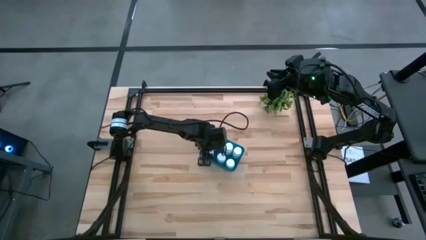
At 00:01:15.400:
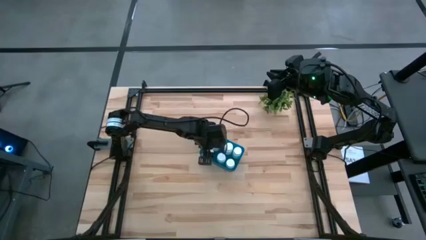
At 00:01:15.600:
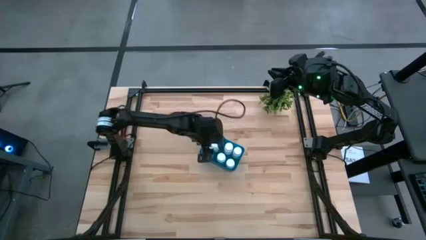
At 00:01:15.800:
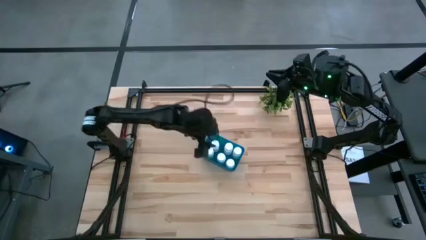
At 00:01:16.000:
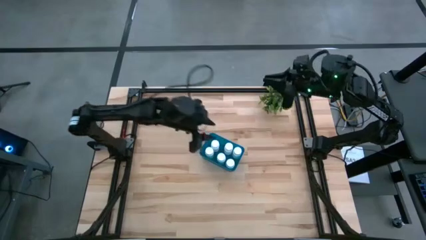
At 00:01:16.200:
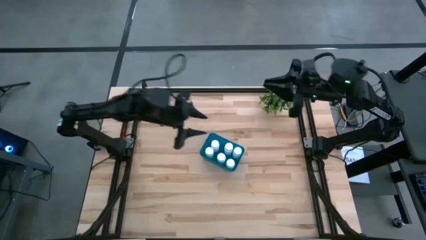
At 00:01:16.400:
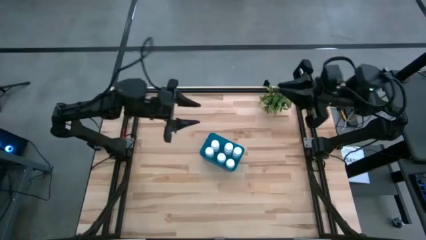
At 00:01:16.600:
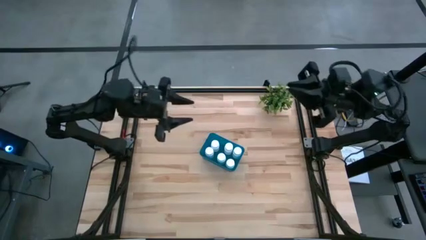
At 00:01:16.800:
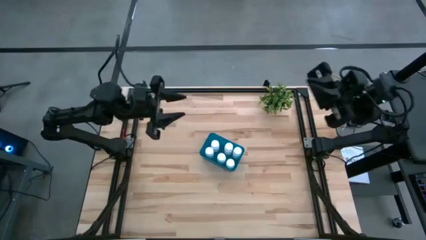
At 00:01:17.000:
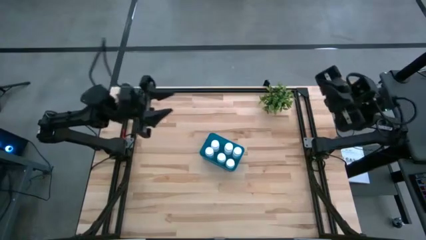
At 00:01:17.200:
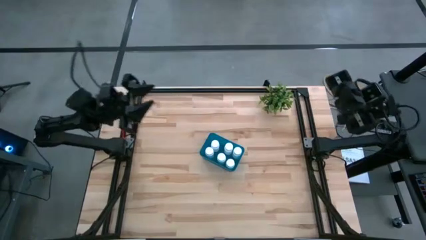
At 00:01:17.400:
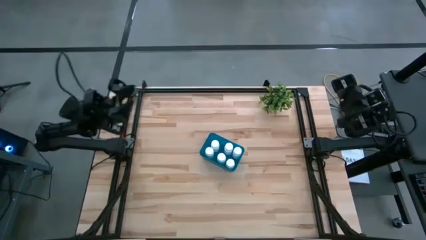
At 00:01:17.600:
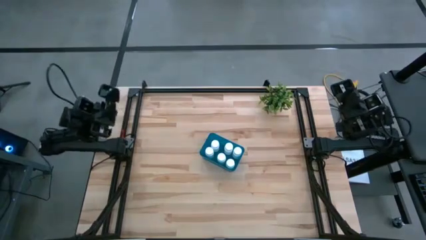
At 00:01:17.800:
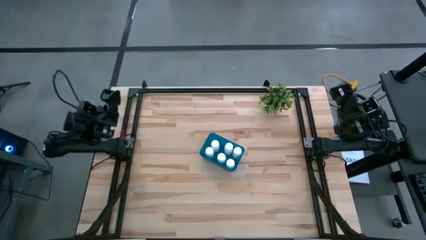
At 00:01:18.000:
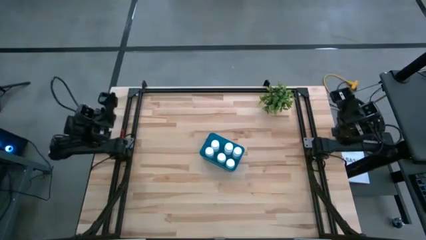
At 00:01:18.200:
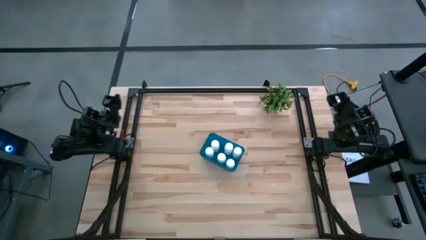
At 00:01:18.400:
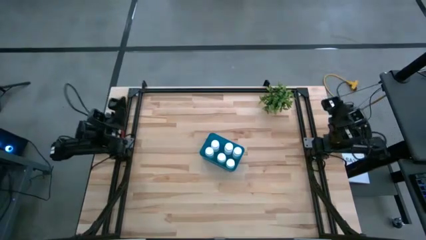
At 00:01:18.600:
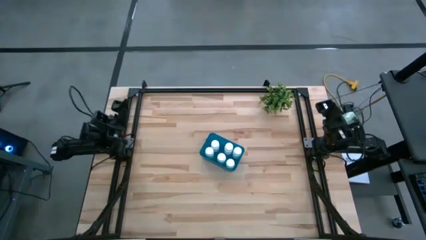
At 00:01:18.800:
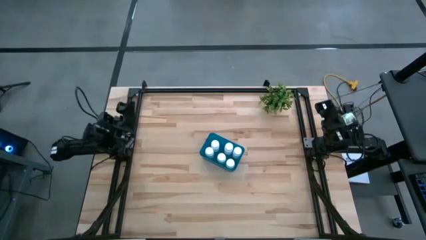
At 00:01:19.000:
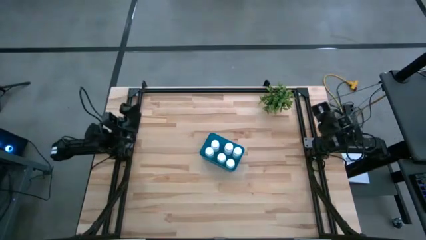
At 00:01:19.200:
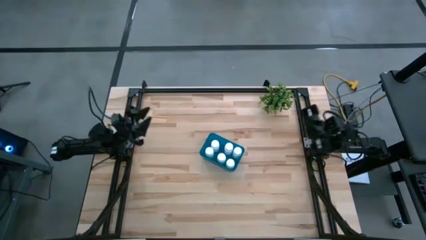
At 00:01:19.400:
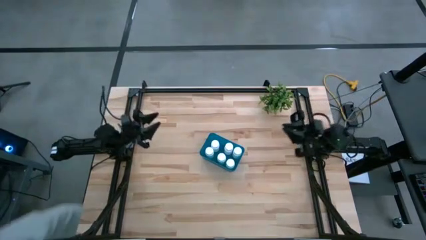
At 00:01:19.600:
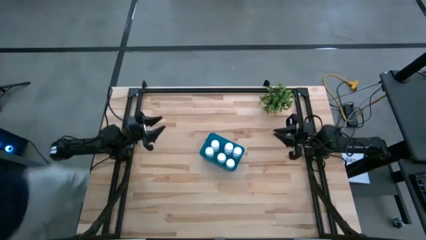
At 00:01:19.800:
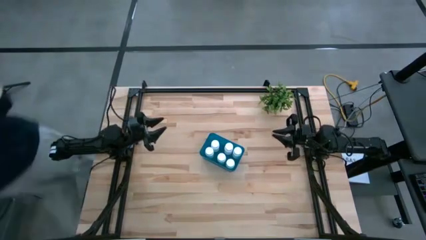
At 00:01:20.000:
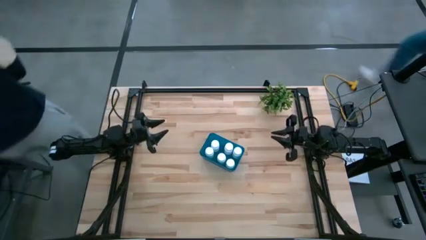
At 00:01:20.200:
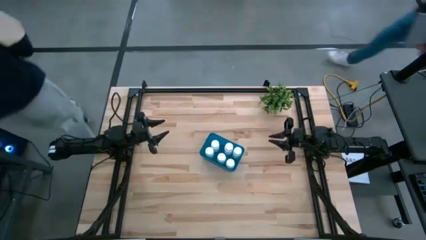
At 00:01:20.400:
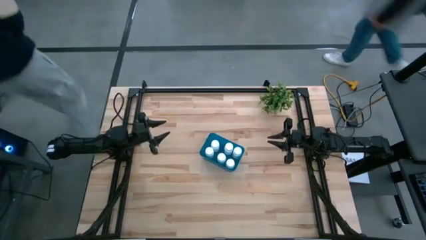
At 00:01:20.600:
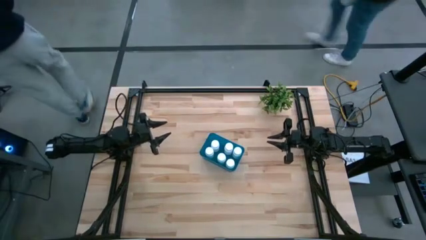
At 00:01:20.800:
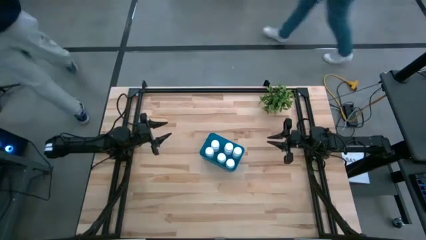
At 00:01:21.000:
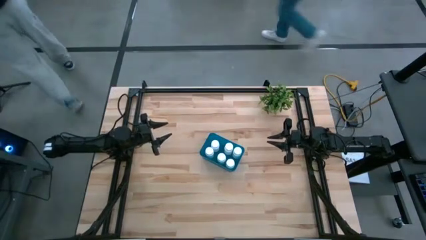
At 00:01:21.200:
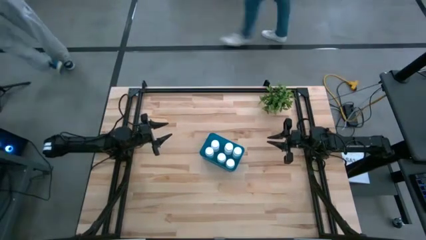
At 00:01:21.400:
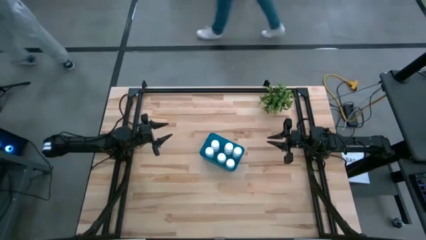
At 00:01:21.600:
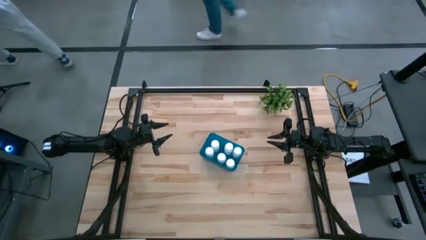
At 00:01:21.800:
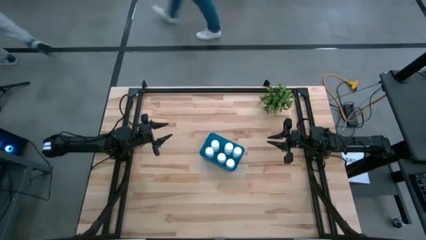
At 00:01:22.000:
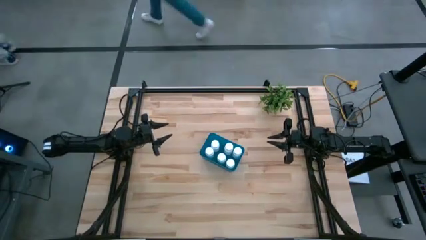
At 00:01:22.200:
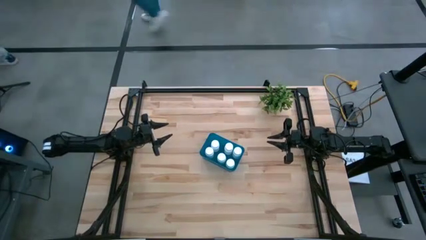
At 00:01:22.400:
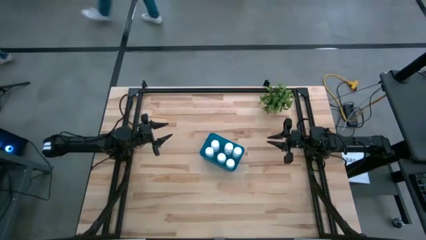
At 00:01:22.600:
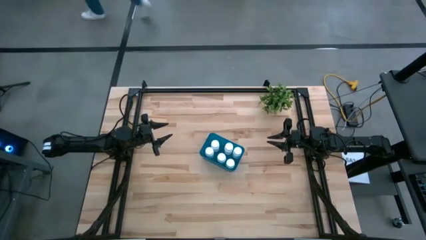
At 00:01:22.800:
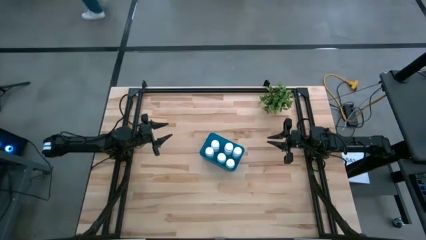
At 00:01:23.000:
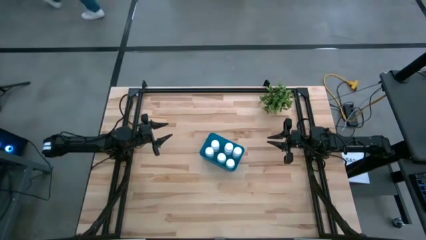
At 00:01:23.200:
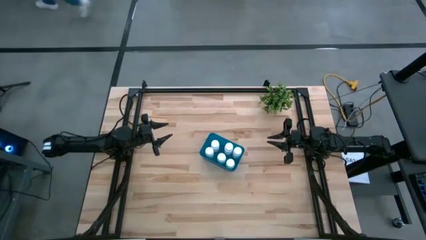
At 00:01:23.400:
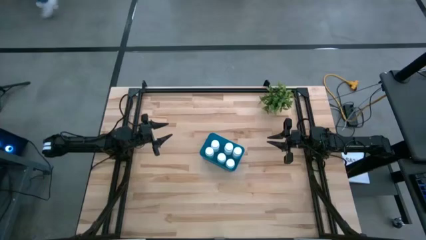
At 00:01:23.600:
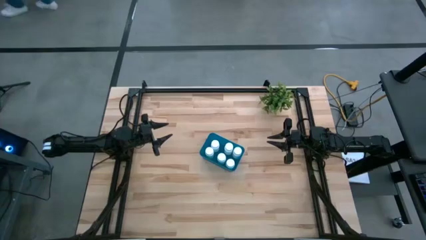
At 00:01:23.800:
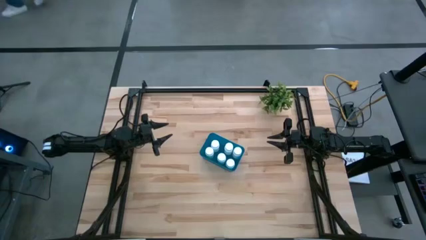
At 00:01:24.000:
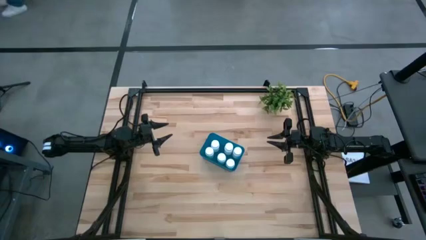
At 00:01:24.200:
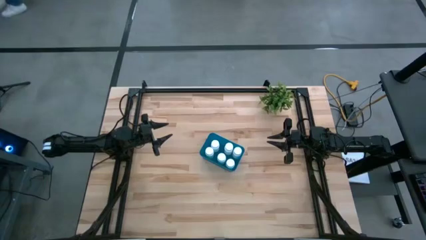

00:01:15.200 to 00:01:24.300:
Task: Pick and place pill bottles into a basket
Return to Home Position

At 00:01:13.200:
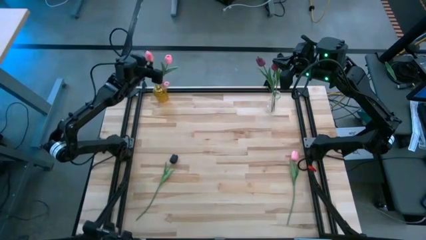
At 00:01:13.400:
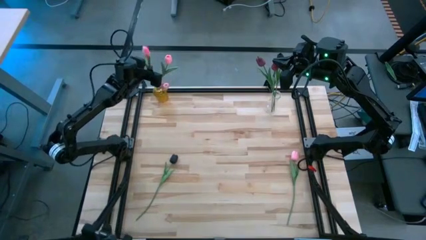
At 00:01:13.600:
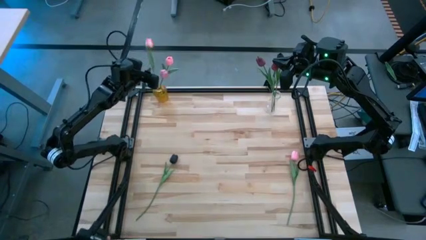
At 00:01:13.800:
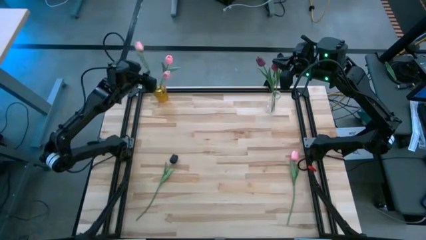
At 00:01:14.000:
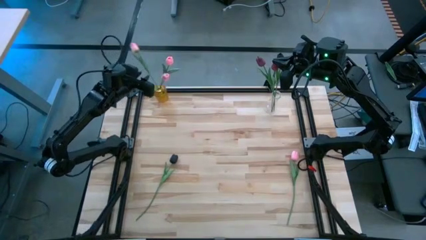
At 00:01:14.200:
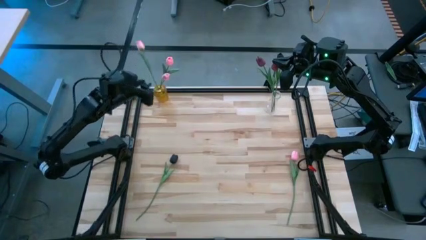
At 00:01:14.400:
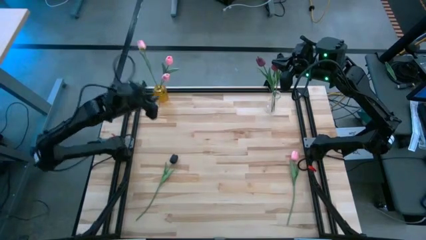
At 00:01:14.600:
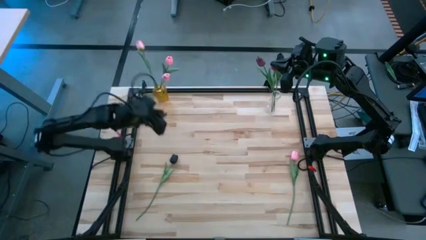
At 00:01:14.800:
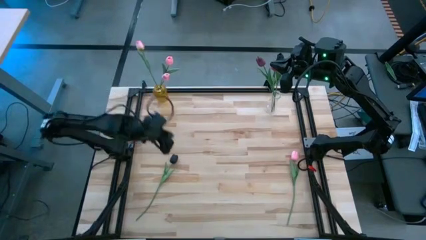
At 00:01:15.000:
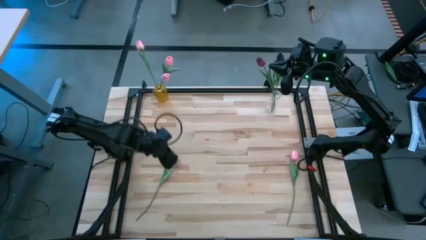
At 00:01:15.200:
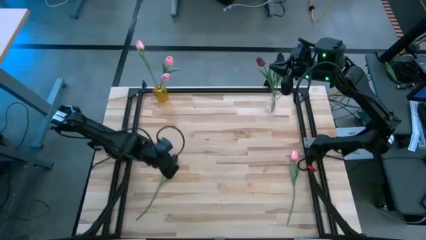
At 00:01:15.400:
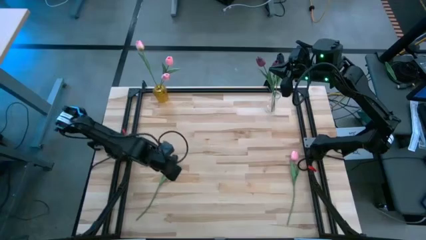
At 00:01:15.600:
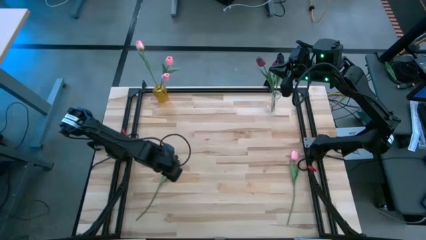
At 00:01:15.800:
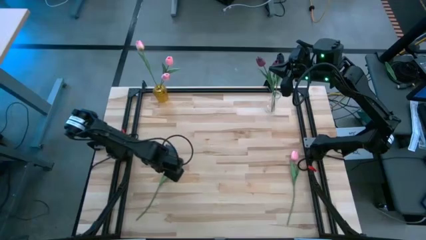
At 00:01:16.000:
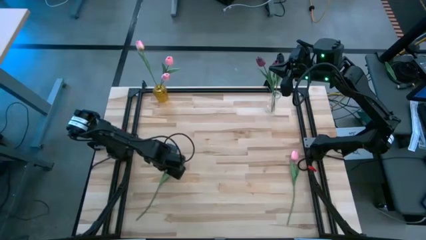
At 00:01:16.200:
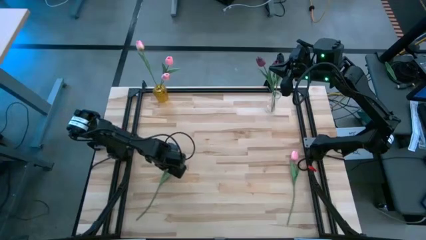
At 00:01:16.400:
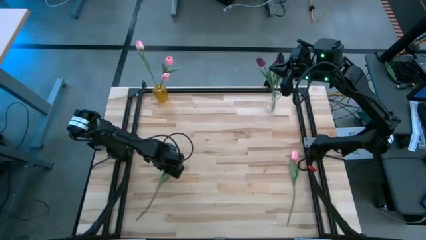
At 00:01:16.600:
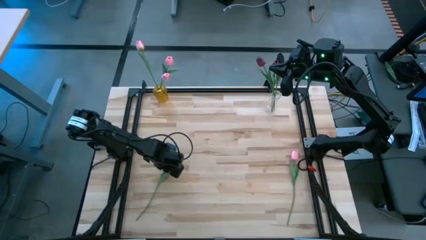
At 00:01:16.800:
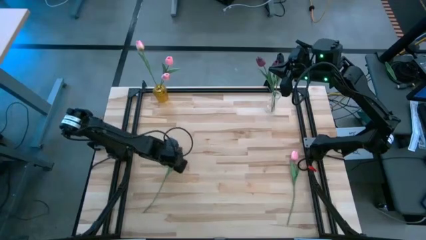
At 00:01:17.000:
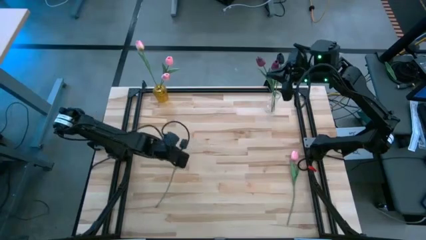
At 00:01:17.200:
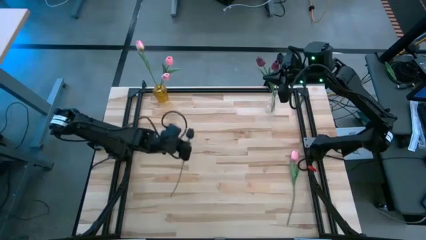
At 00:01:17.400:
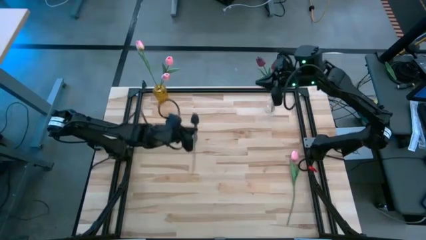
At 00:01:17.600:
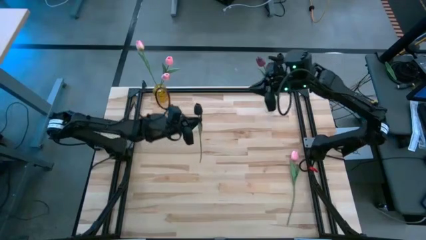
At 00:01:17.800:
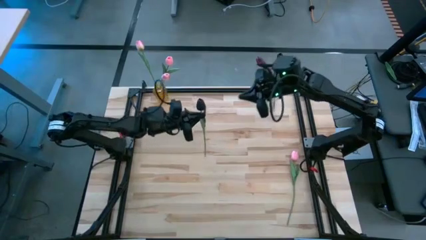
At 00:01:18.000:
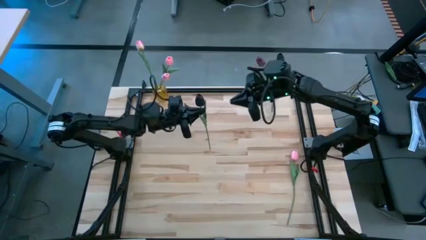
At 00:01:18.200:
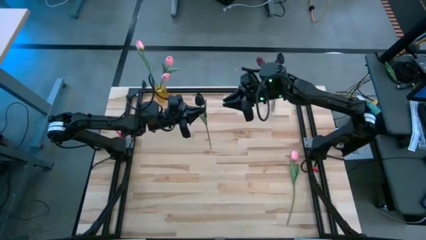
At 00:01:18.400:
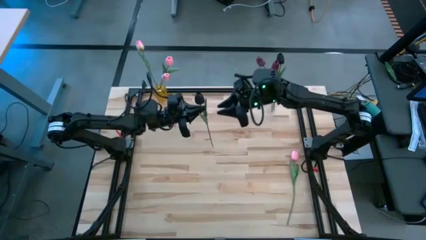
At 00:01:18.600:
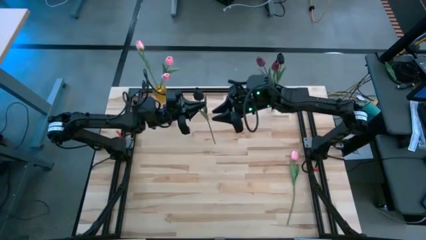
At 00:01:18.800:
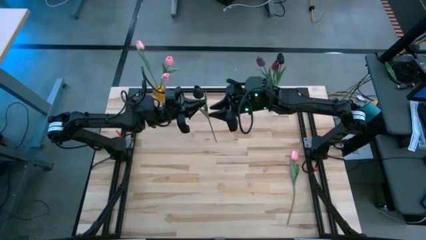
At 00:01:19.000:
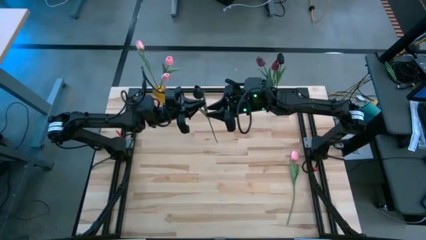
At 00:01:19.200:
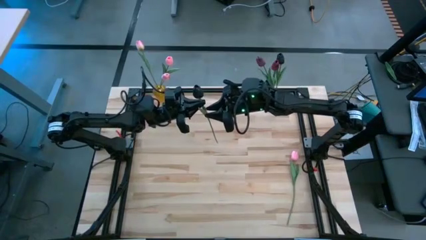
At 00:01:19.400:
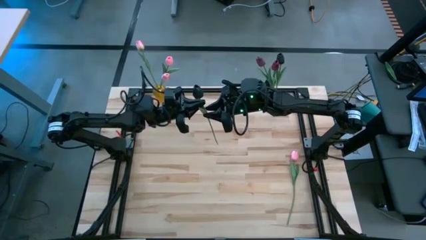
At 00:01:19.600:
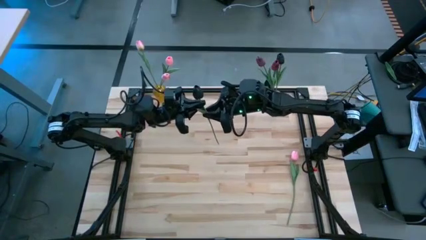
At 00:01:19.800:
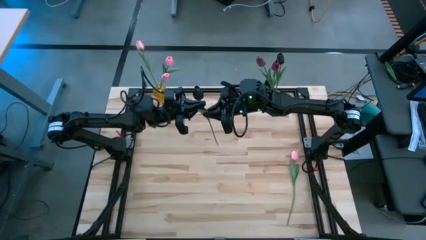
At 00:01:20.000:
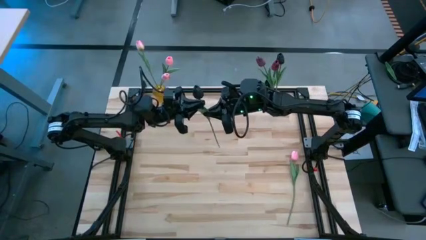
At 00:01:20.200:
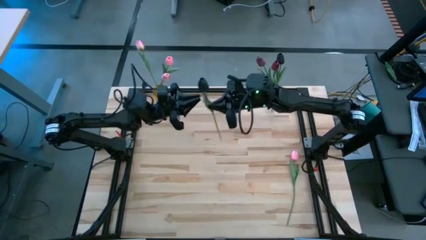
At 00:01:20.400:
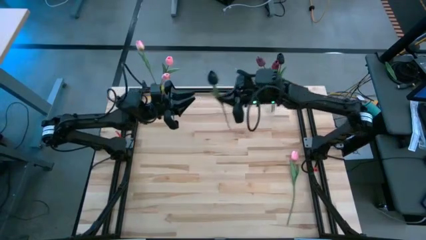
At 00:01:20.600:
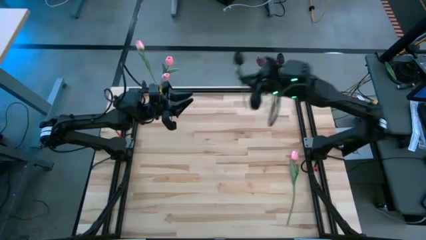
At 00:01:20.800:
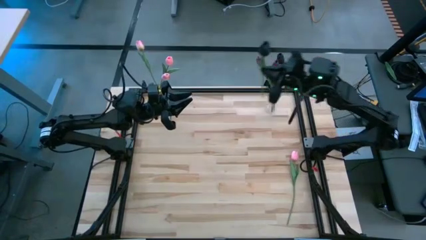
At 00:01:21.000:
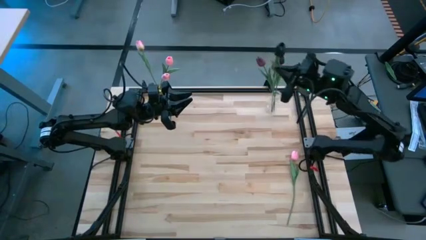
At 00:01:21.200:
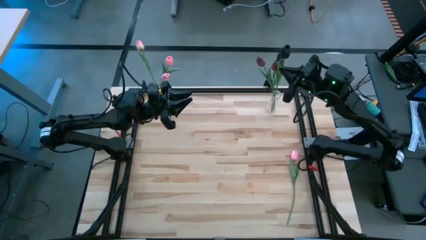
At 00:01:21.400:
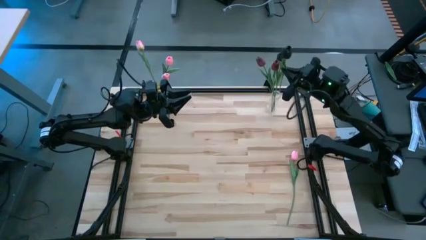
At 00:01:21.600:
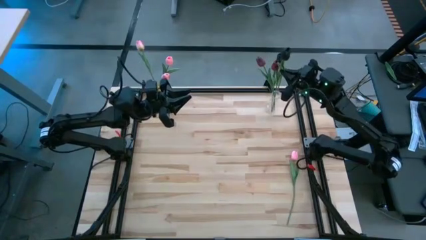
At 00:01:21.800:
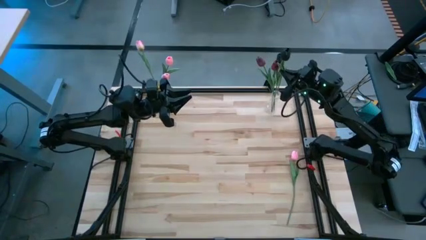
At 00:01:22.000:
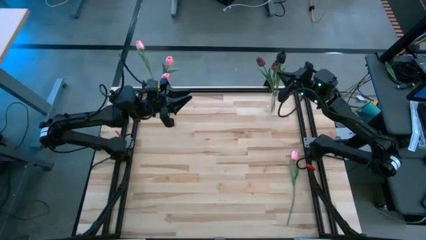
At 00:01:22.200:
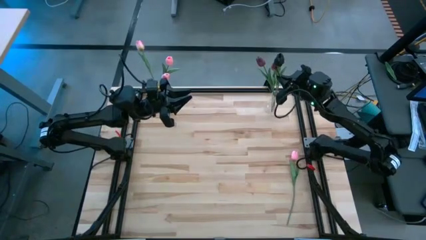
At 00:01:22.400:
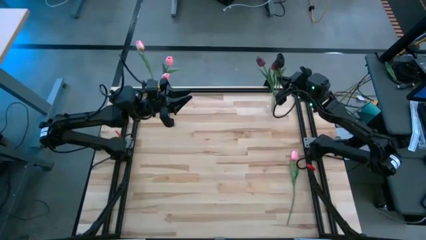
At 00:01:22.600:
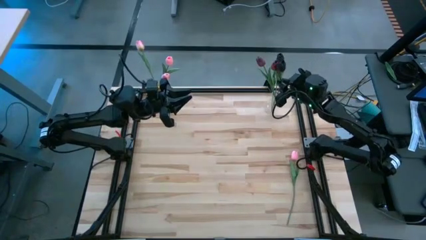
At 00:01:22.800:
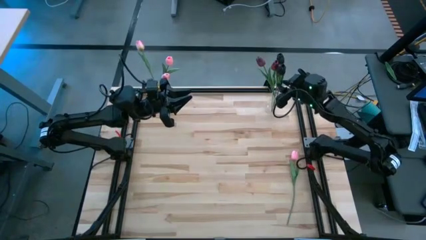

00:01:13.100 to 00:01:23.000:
Task: Sort flowers into vase by color
Insert the black tulip into the transparent vase
